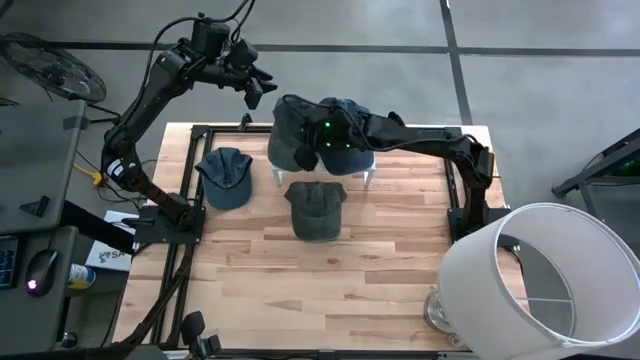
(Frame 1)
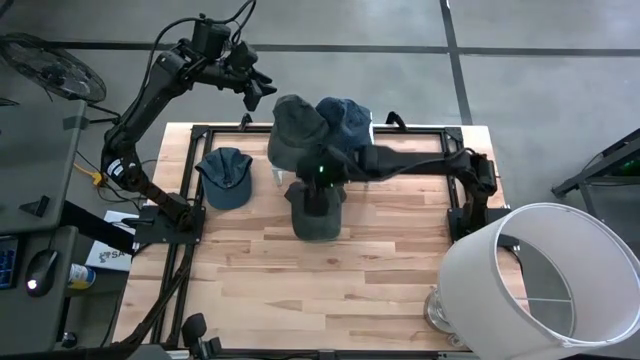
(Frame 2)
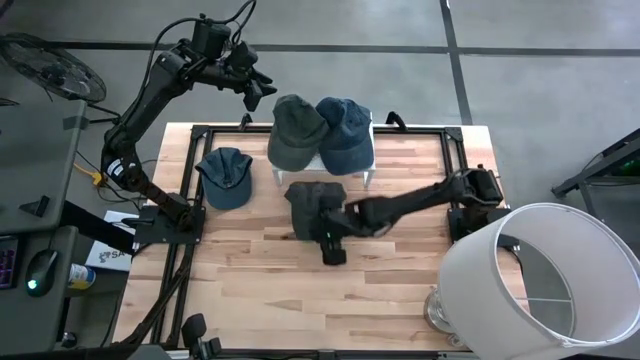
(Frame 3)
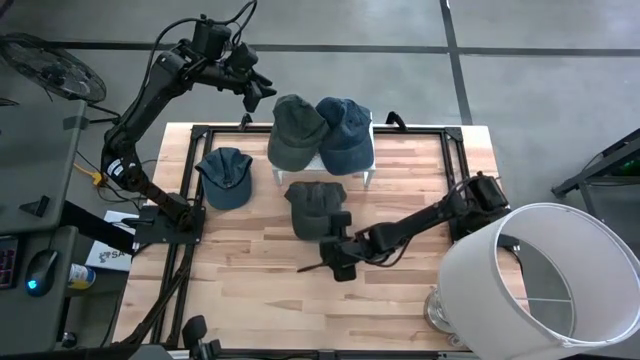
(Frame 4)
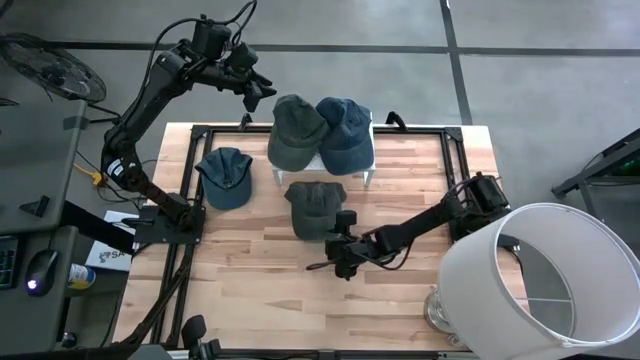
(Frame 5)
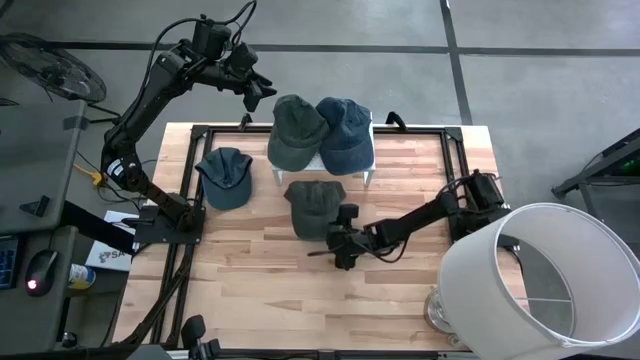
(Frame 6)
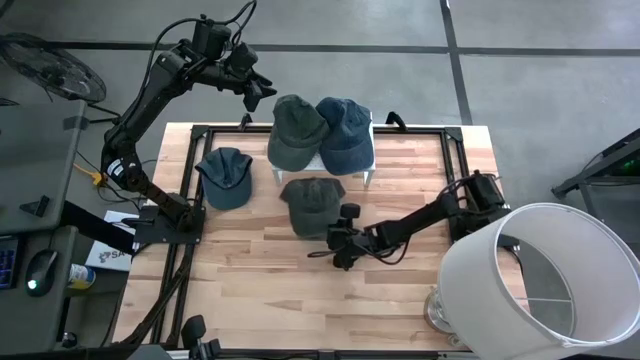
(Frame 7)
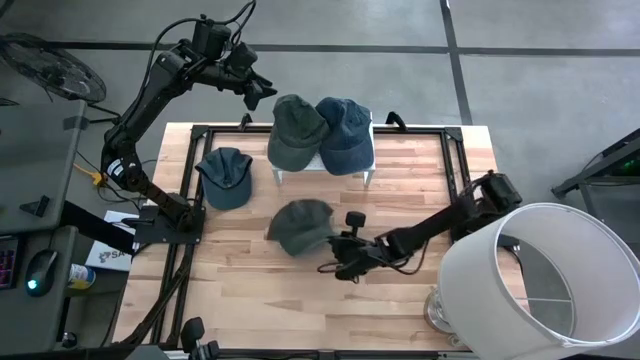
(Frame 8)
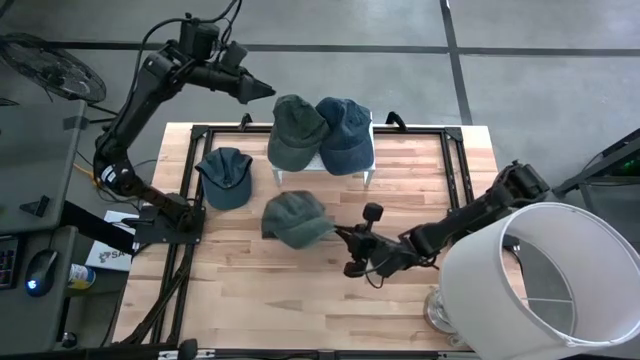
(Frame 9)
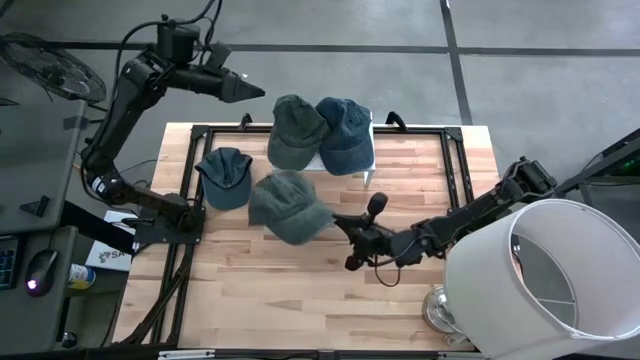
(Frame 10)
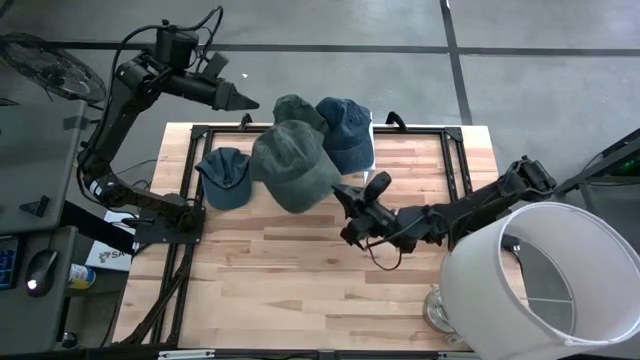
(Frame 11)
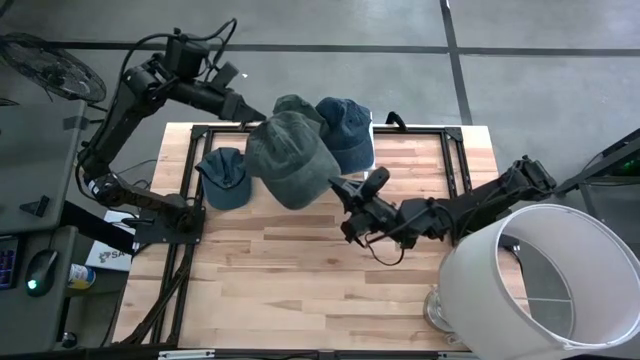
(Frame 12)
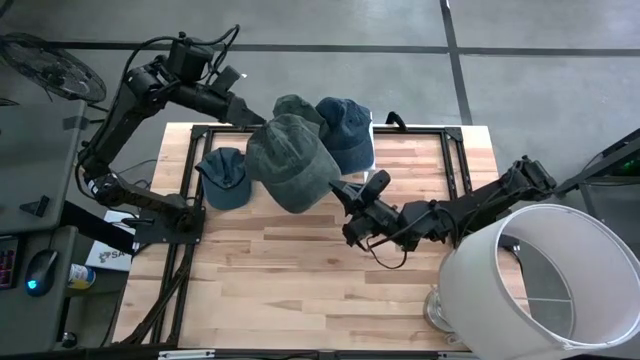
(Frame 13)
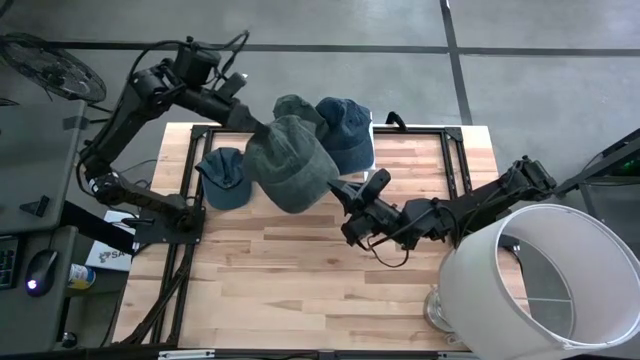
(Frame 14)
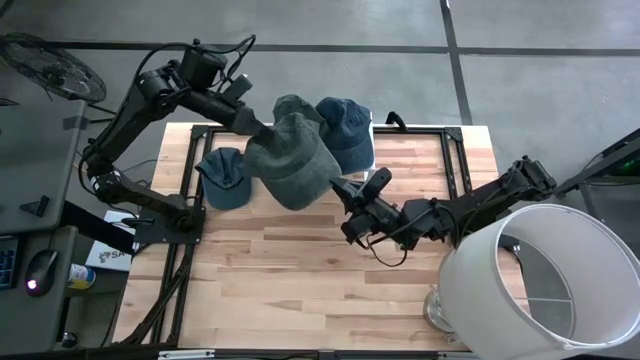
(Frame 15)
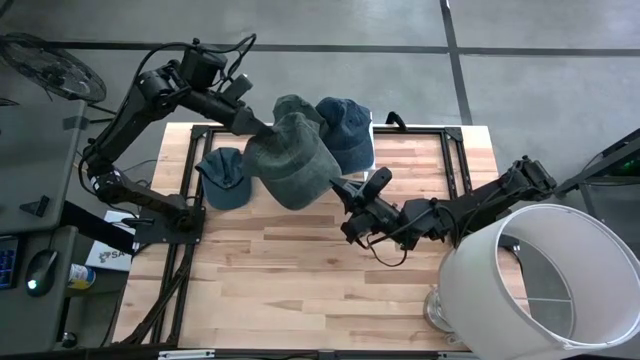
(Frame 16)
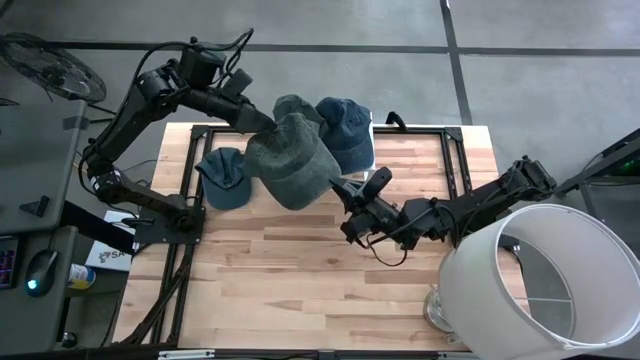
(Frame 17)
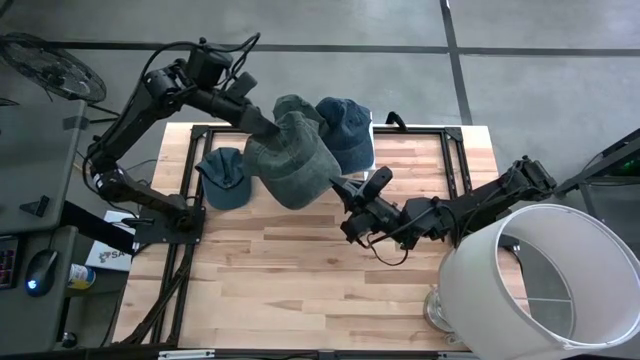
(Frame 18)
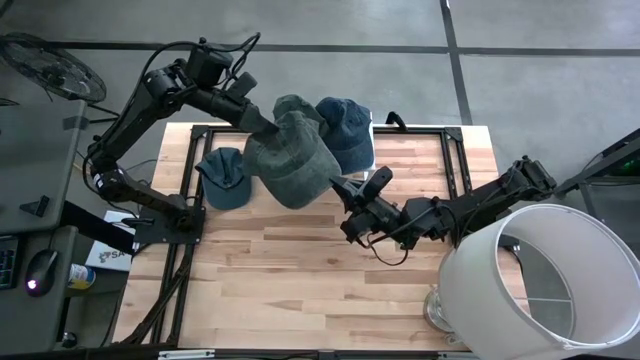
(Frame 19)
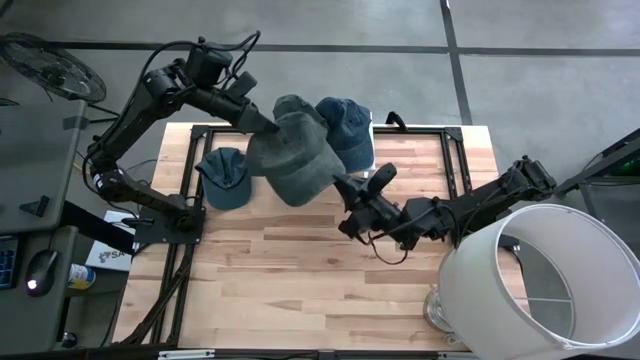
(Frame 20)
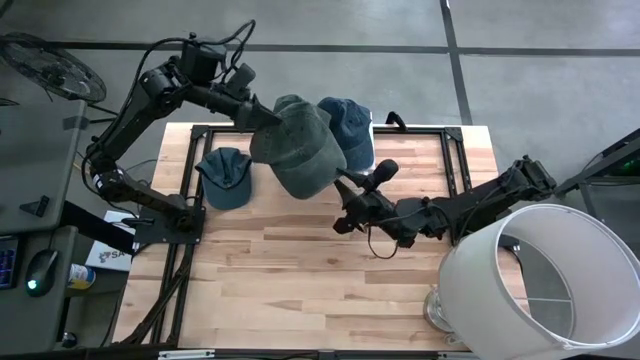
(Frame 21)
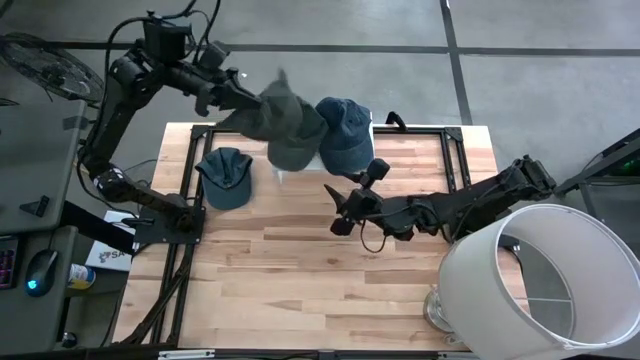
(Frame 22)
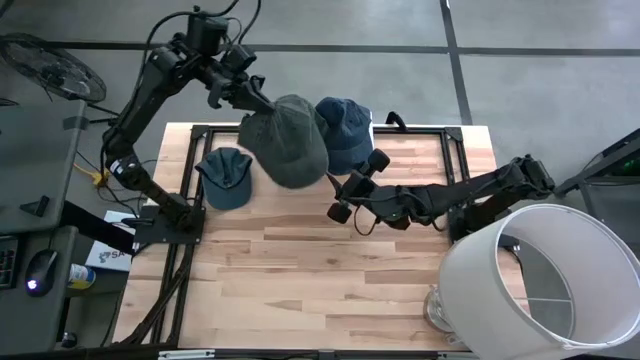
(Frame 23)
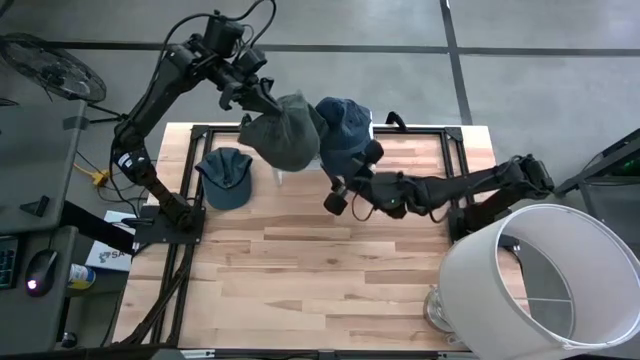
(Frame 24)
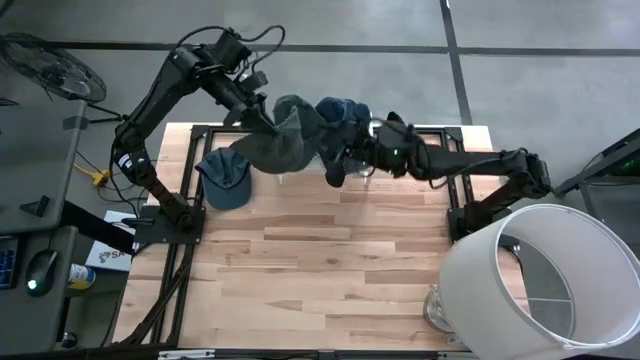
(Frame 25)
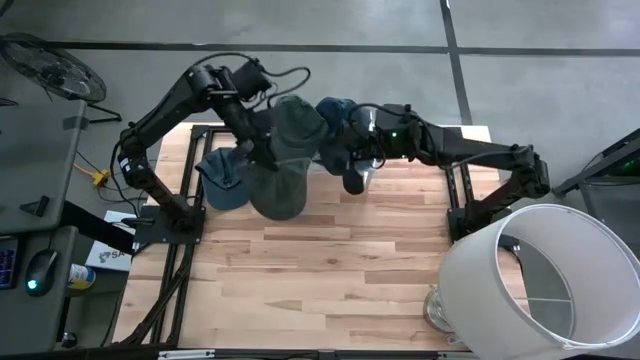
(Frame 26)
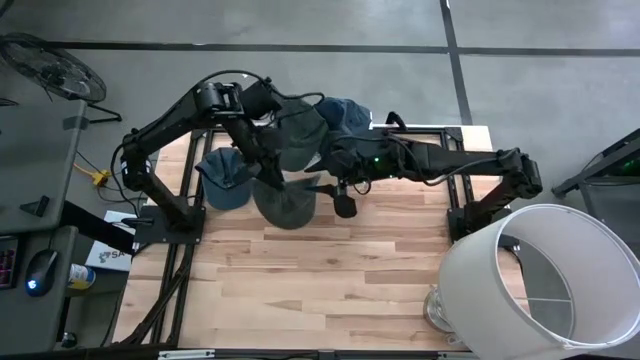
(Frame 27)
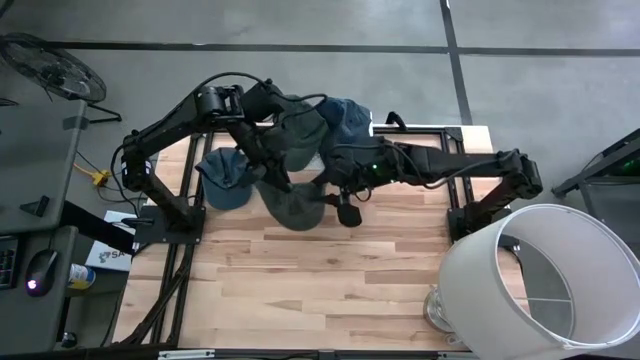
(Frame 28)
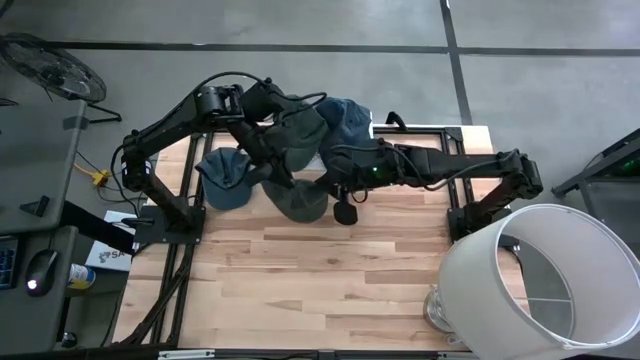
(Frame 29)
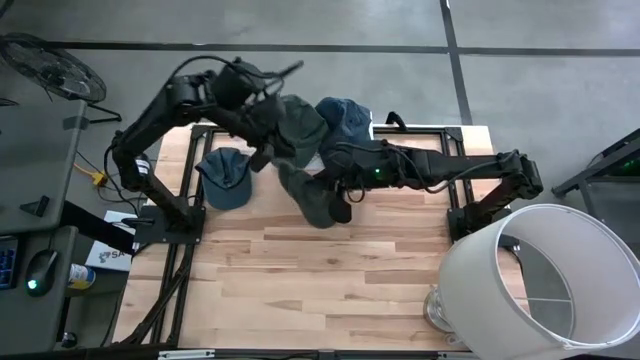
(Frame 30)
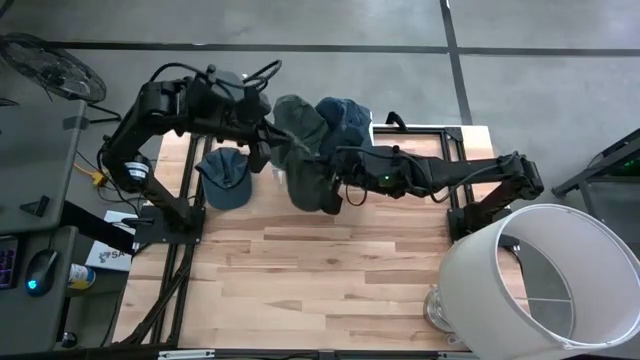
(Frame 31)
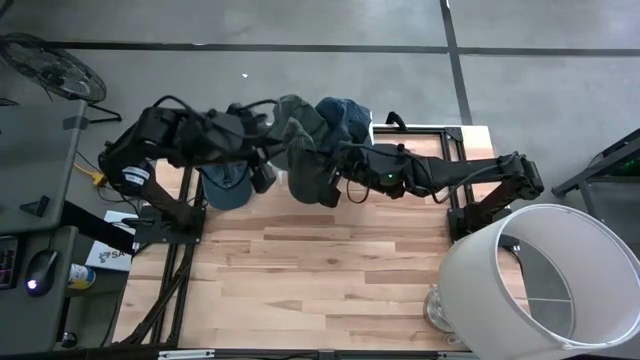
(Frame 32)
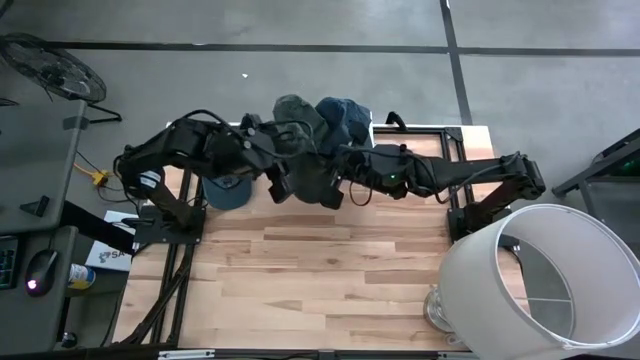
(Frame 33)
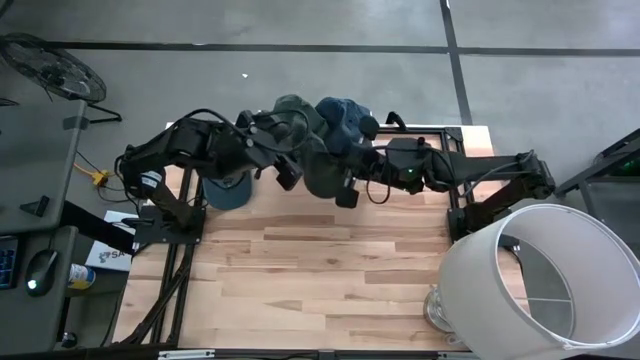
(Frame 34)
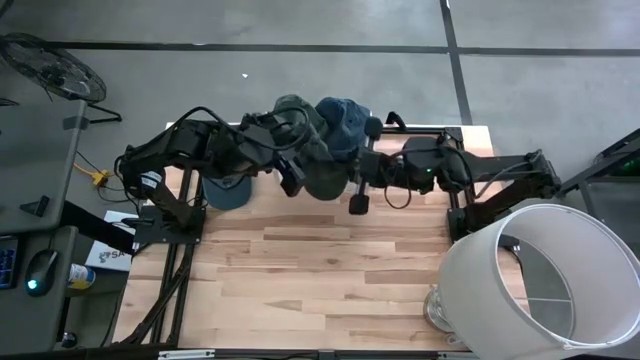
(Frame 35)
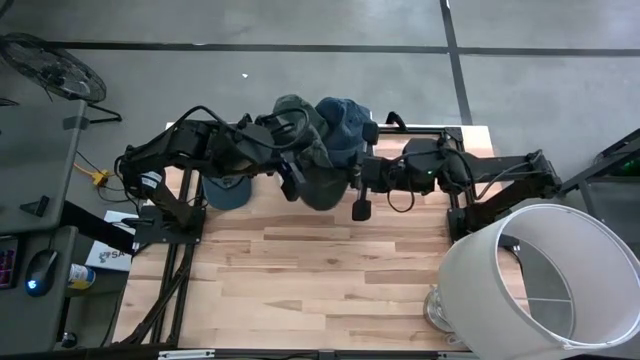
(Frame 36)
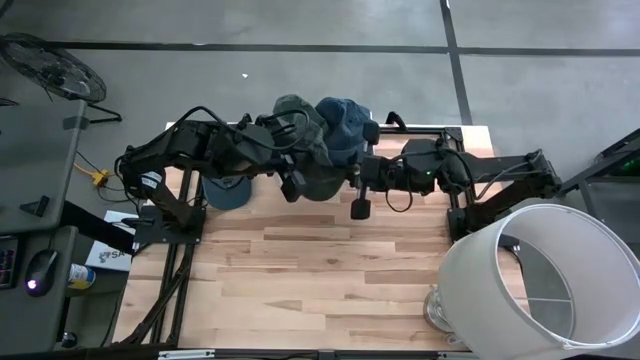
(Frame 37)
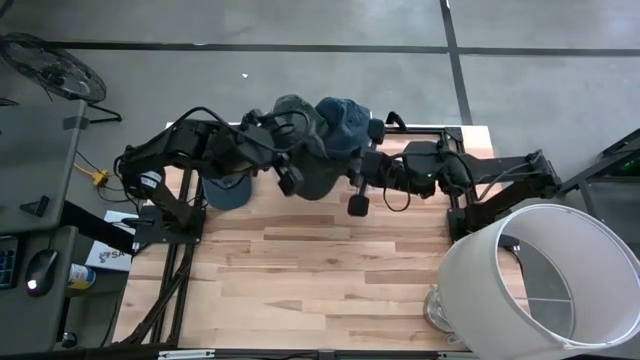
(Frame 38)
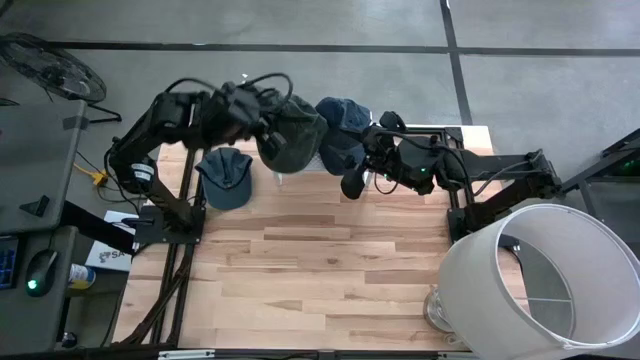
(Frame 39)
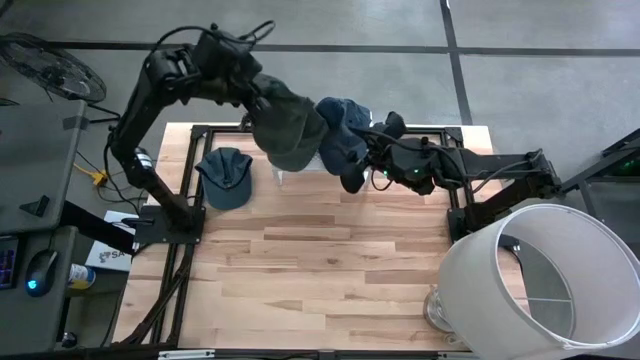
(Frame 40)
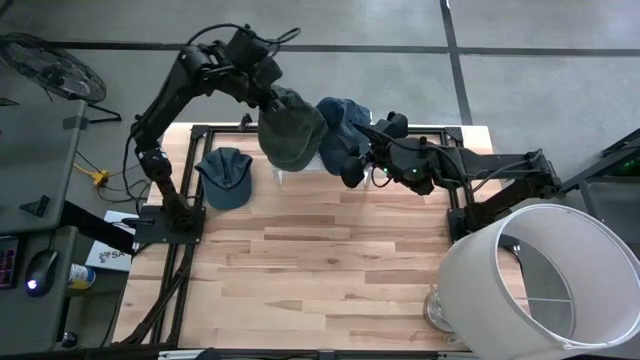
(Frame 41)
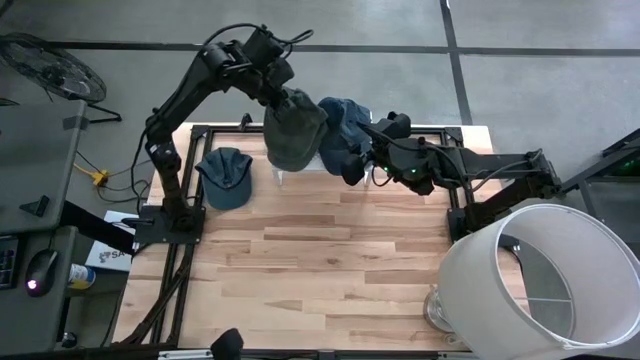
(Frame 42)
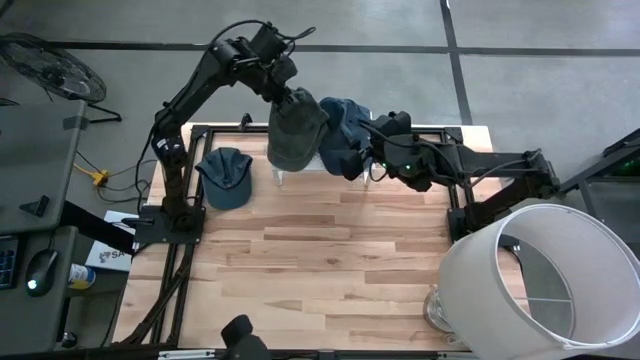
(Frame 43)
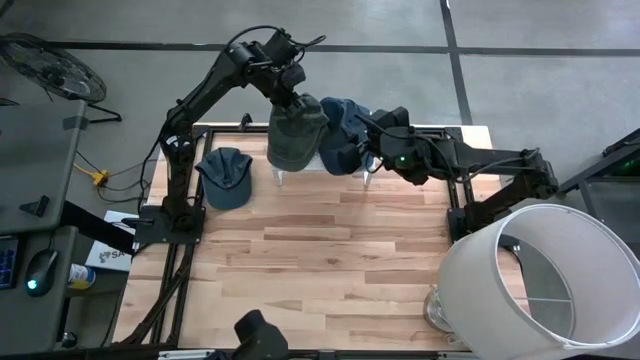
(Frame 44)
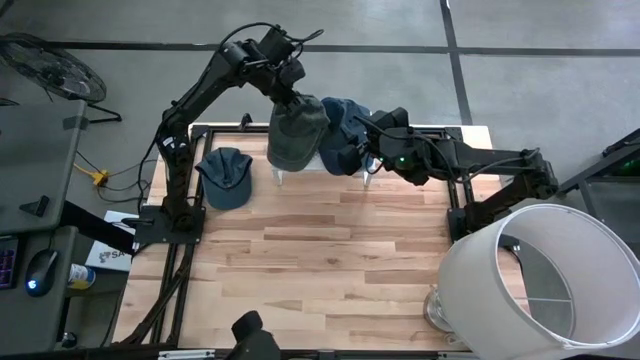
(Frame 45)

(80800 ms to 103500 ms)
Task: Pick & Place hat
Put the gray cap on the shelf
